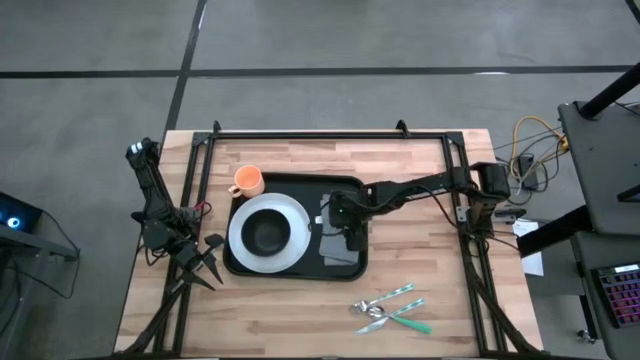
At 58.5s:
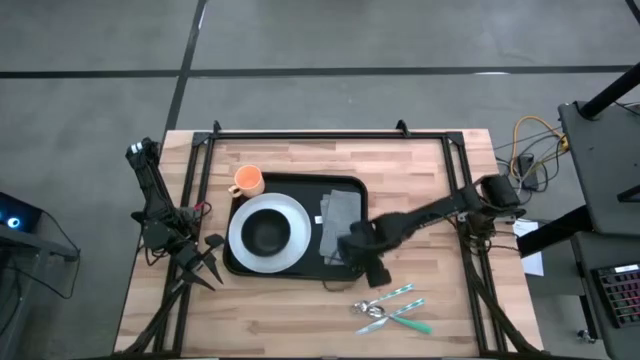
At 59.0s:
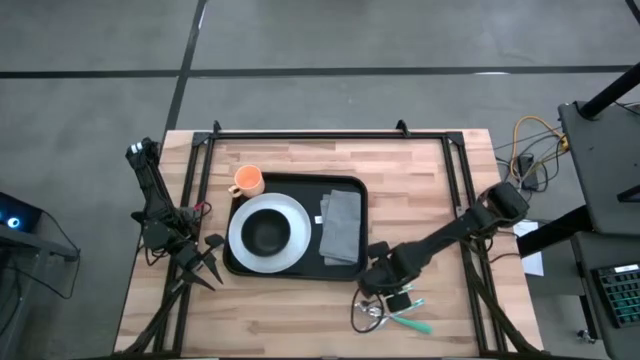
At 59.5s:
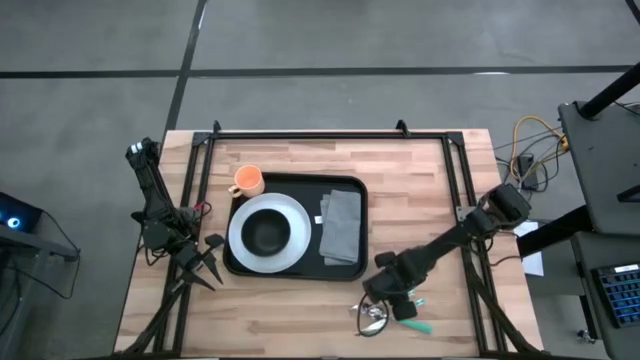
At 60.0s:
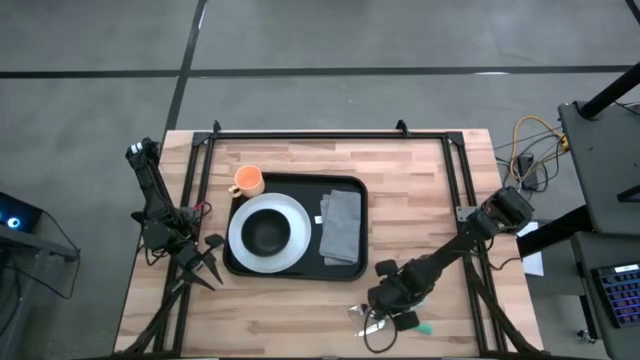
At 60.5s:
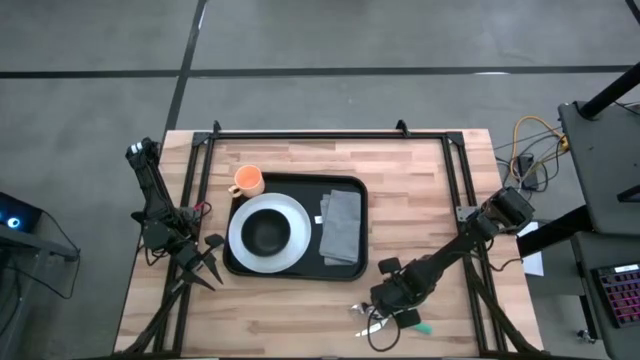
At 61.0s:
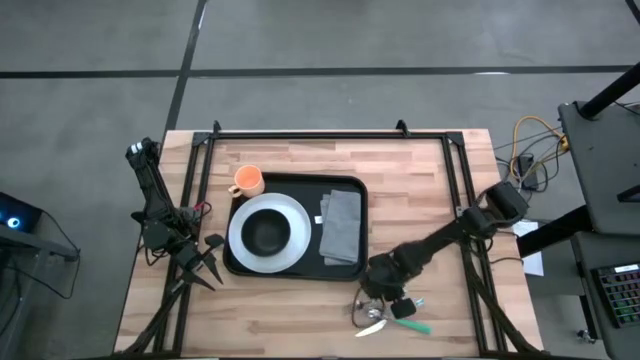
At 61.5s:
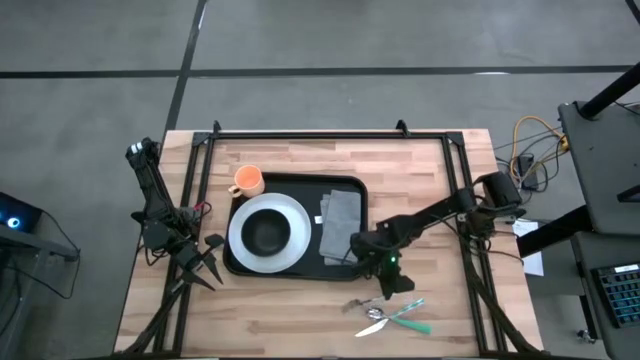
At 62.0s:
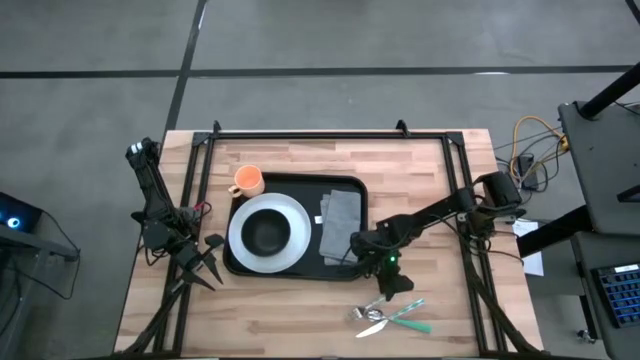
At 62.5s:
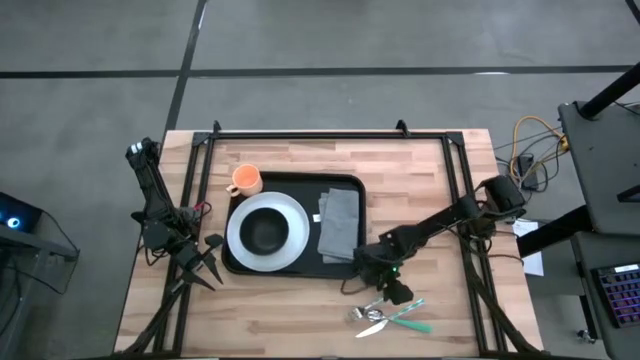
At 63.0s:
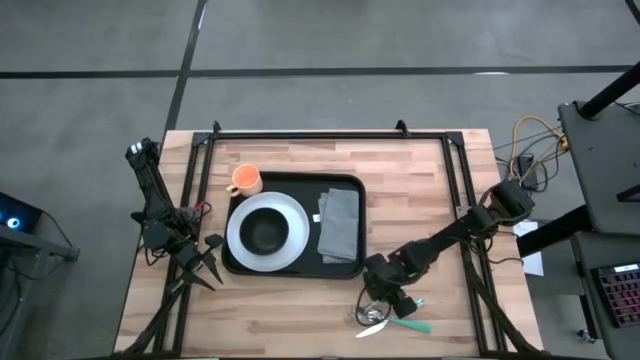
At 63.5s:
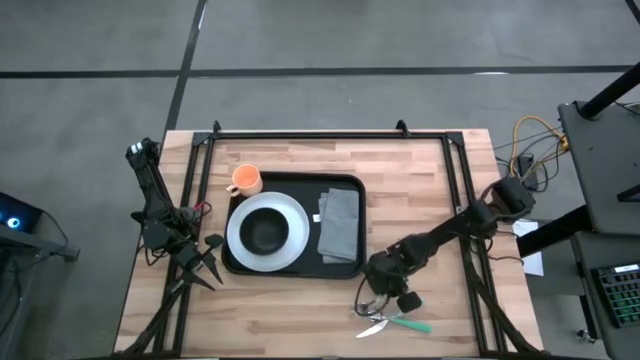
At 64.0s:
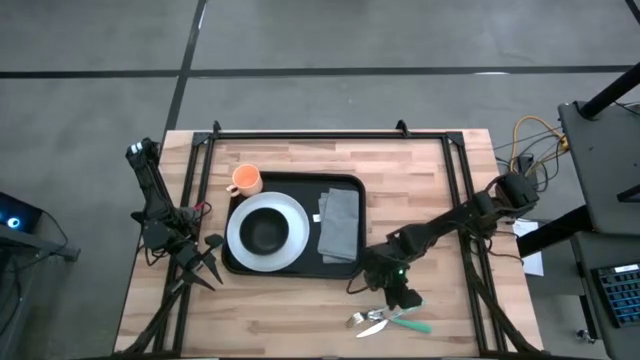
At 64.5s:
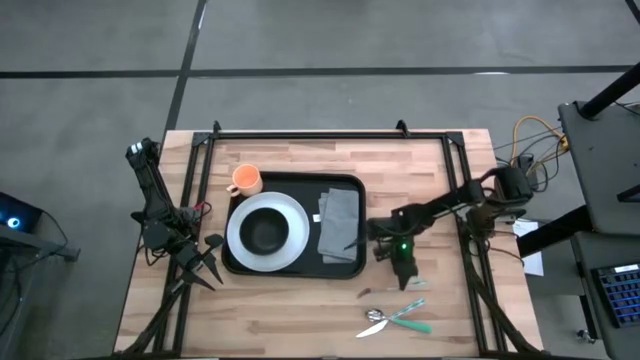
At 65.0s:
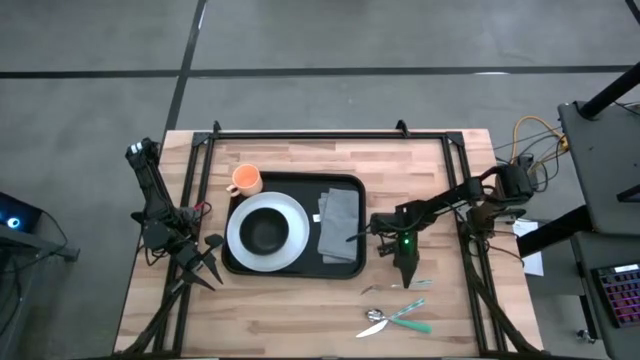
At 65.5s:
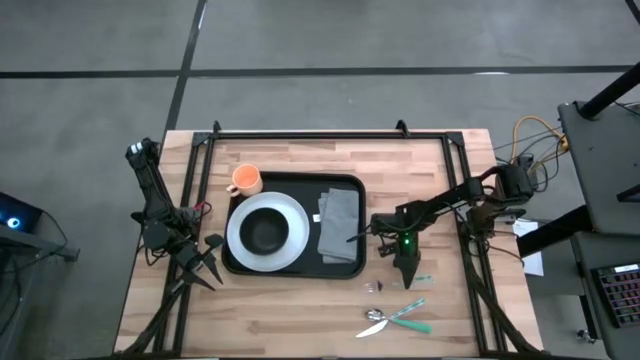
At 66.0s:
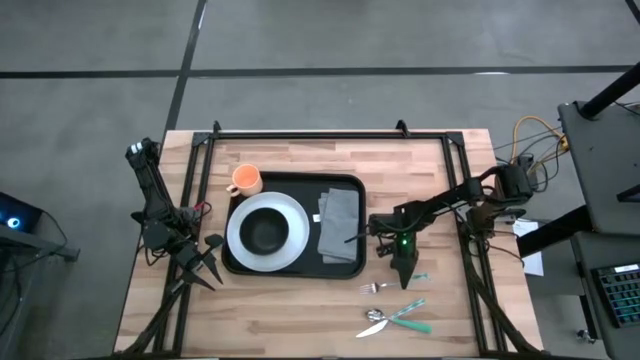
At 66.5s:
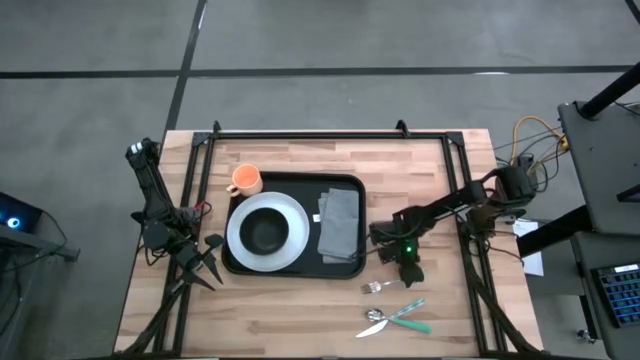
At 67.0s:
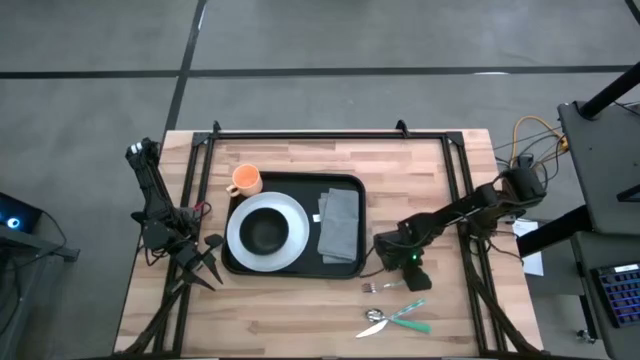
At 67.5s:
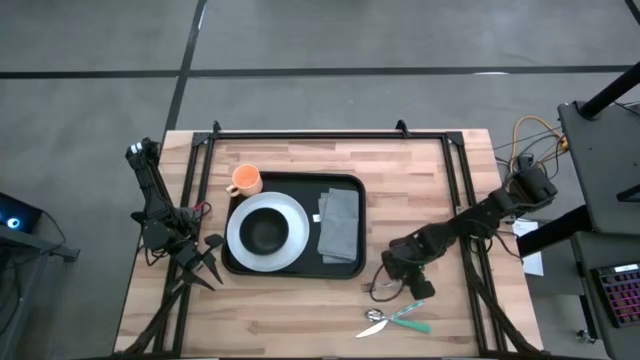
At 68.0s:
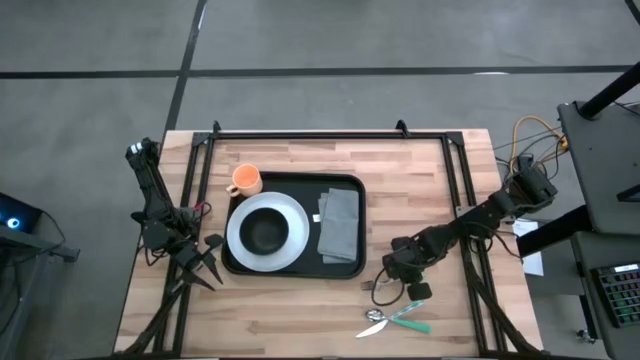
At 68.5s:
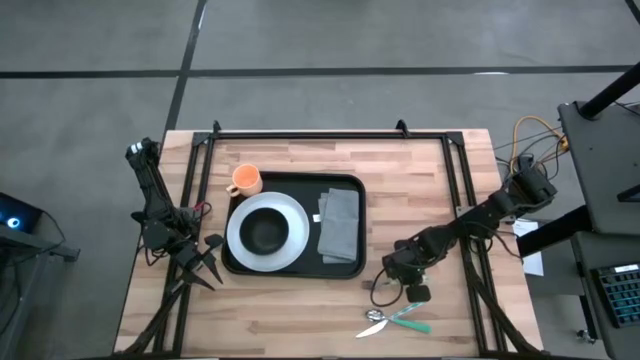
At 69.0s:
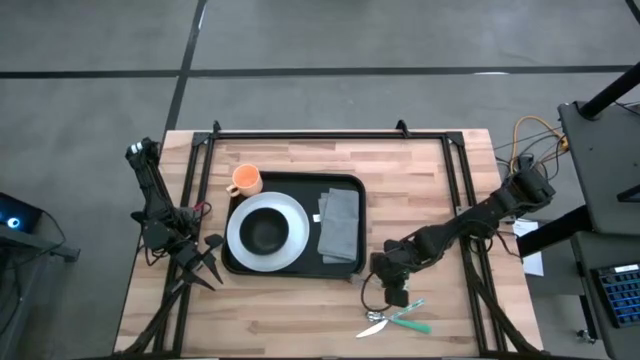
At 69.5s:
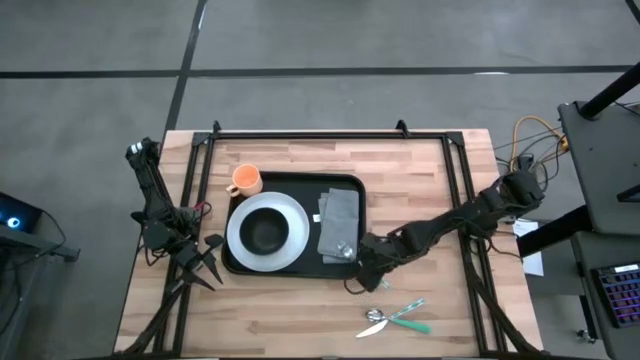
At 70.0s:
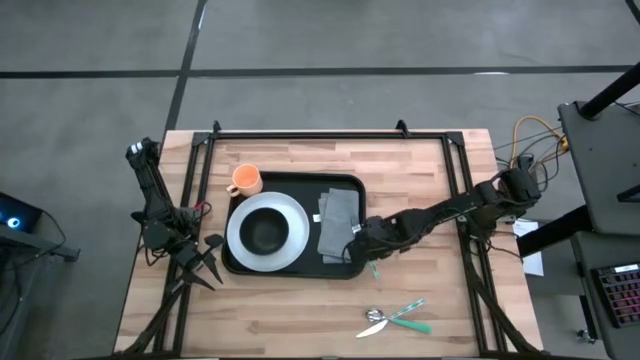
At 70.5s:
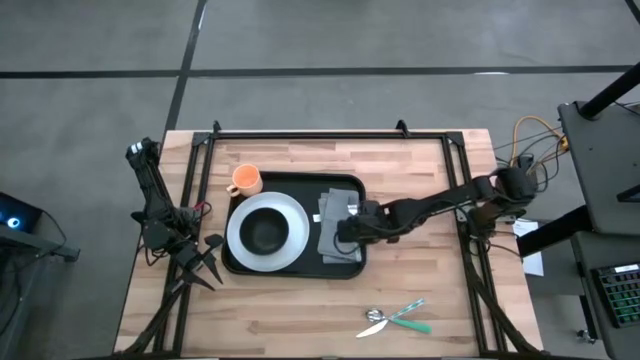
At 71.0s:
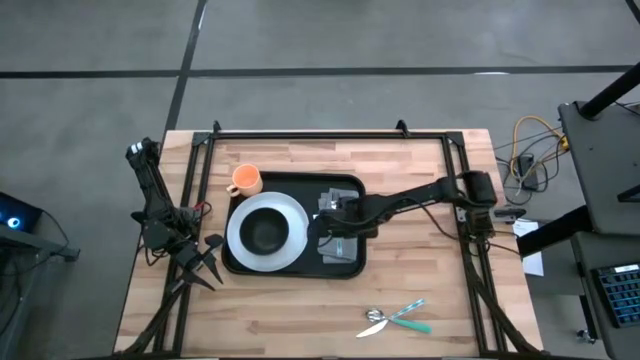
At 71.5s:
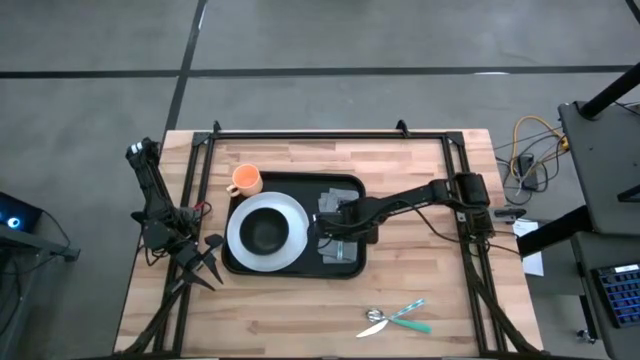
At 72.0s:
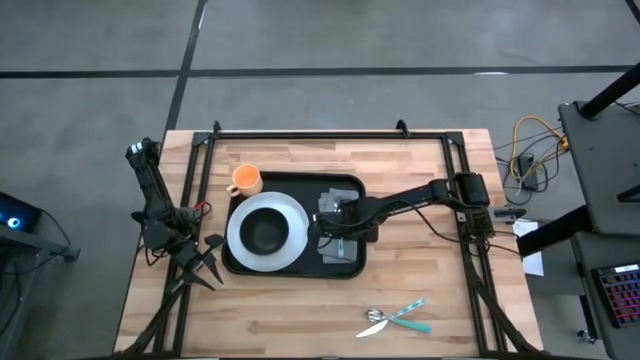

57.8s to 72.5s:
Task: Set up tray
Put the blue patterned fork on top of the gray napkin on the black serving tray

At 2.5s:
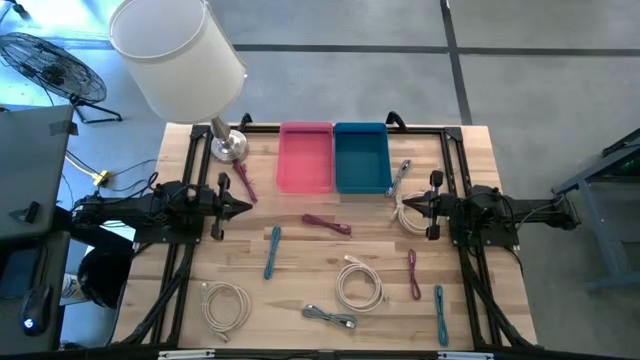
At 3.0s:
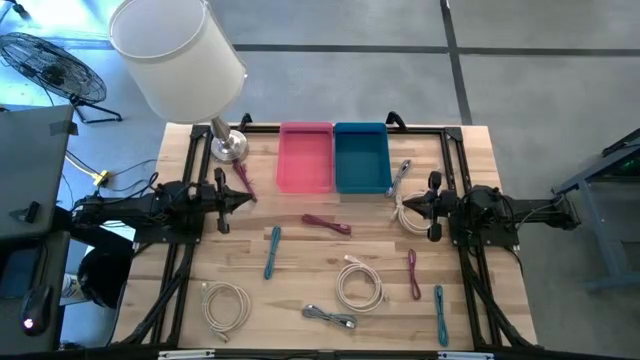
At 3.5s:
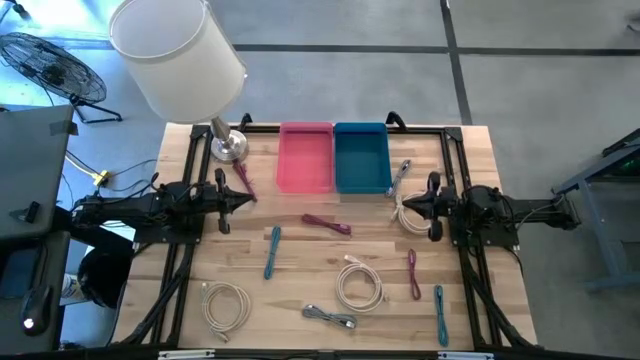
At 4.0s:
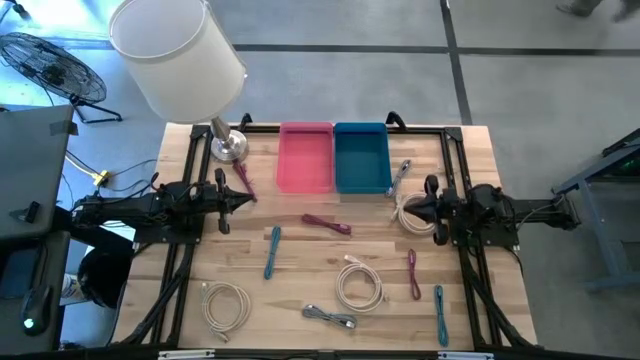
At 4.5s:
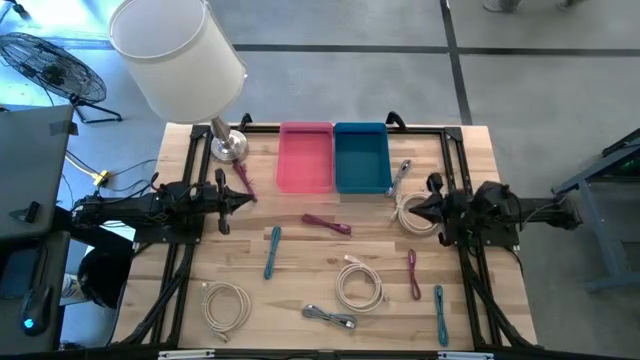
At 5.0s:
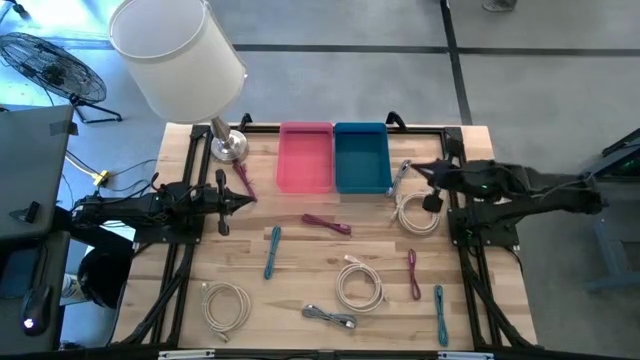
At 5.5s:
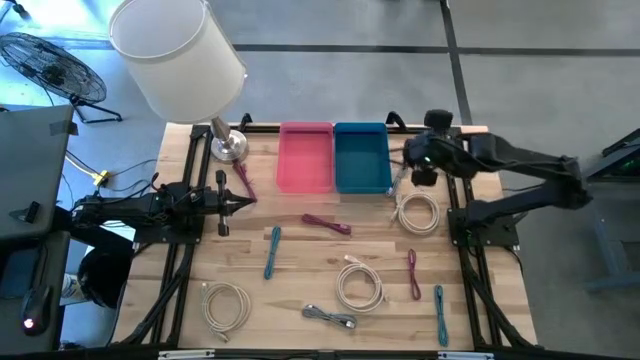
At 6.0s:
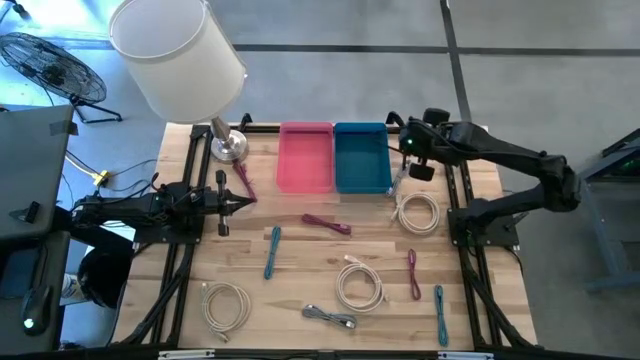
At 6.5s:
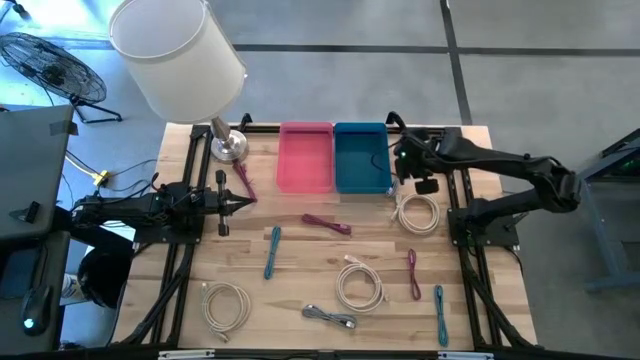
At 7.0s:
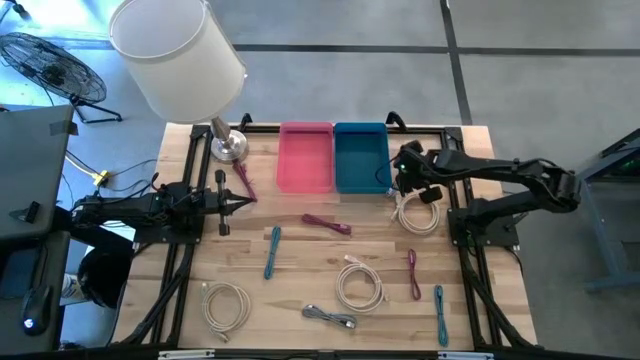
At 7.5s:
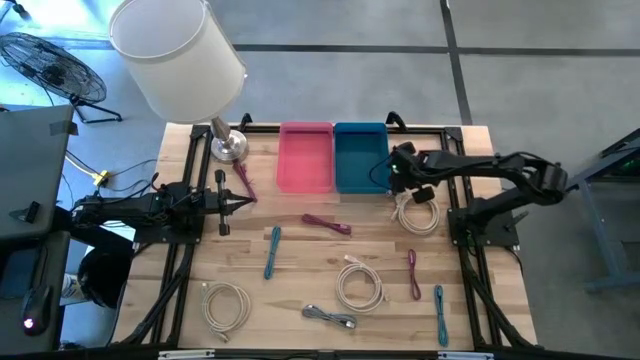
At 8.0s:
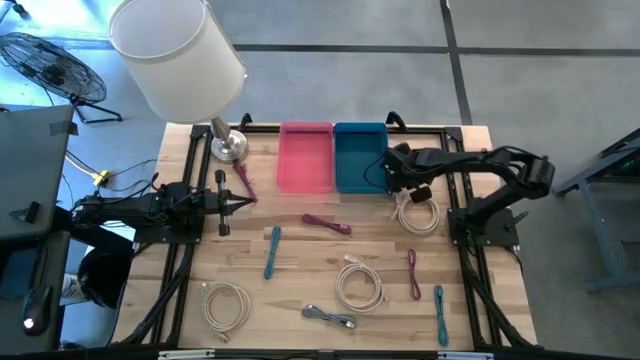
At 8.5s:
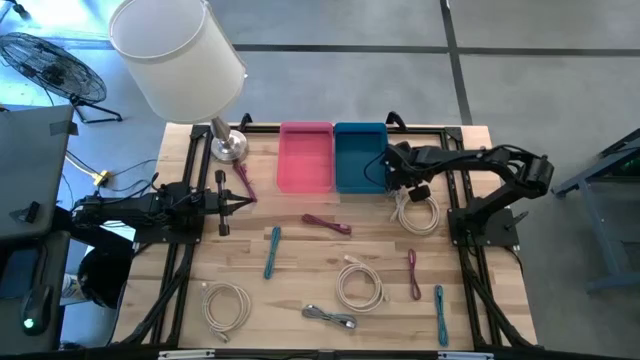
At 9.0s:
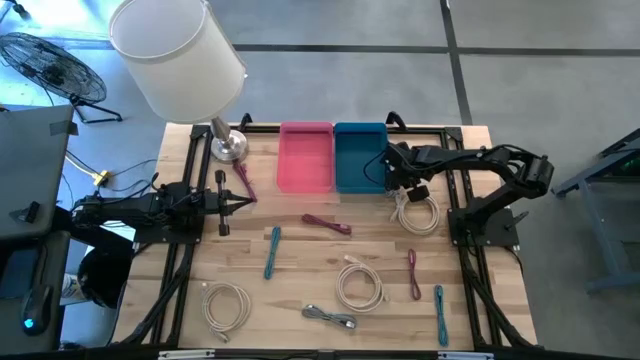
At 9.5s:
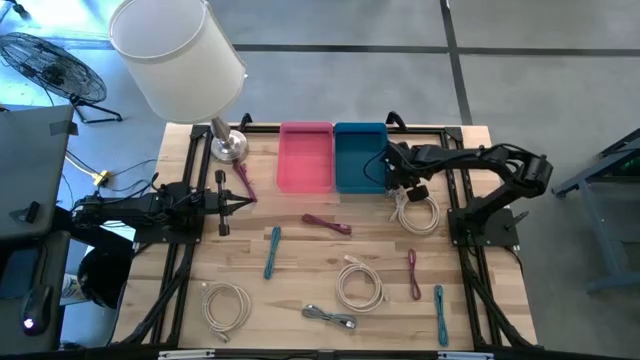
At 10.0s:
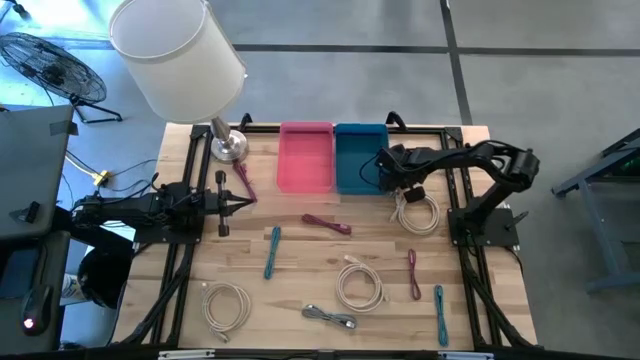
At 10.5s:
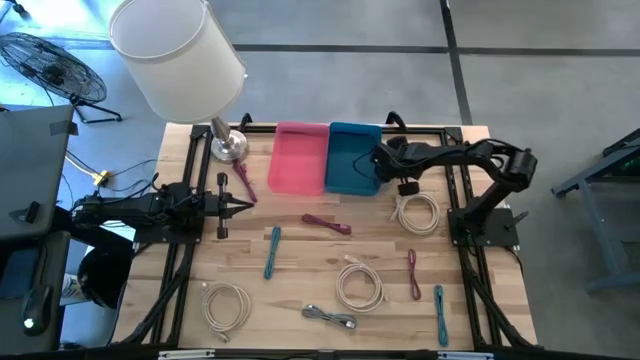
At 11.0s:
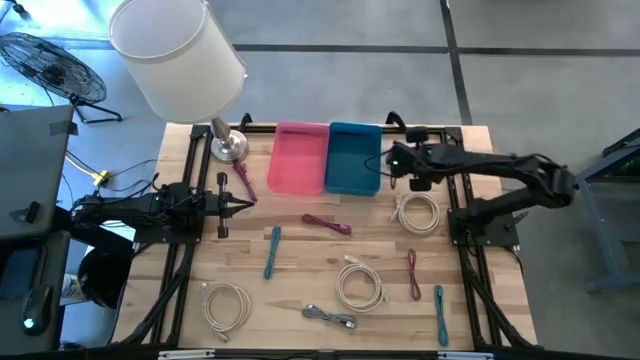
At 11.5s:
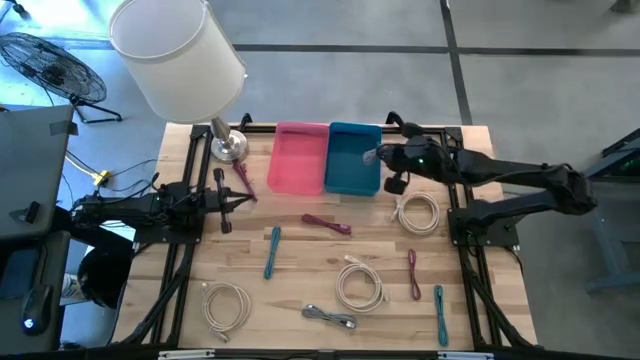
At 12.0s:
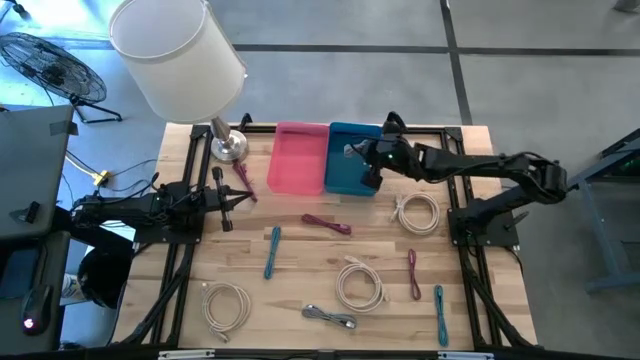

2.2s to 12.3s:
Task: Pick & Place USB Port
Put the top white and black charger cable into the blue bin
